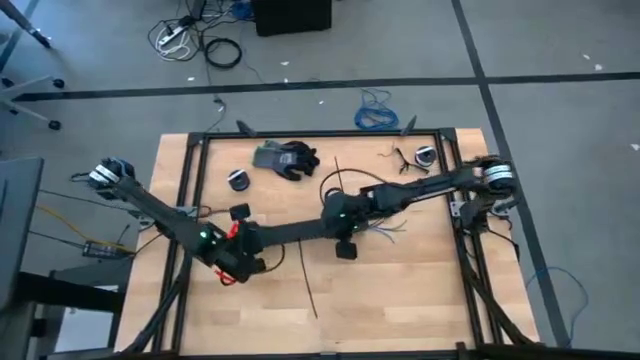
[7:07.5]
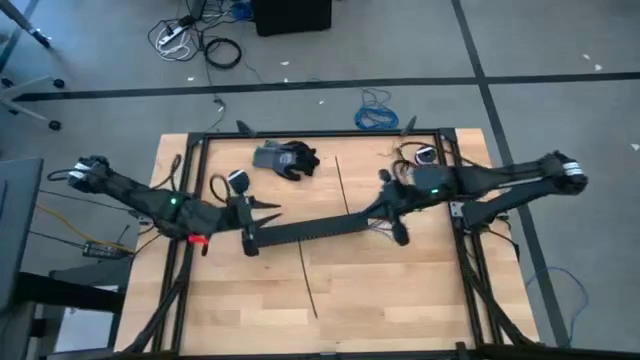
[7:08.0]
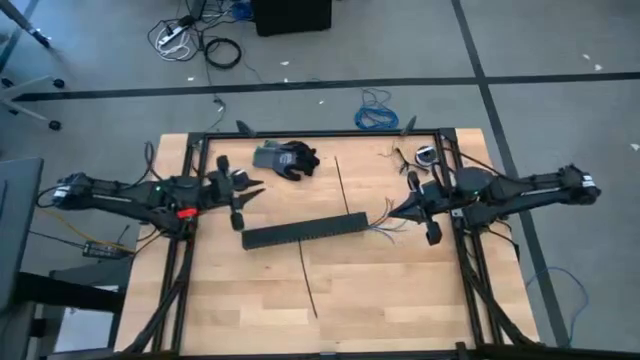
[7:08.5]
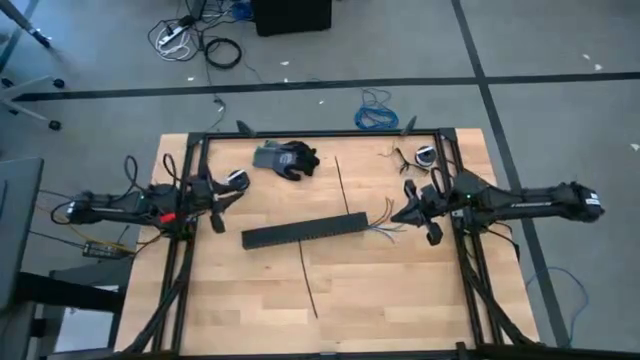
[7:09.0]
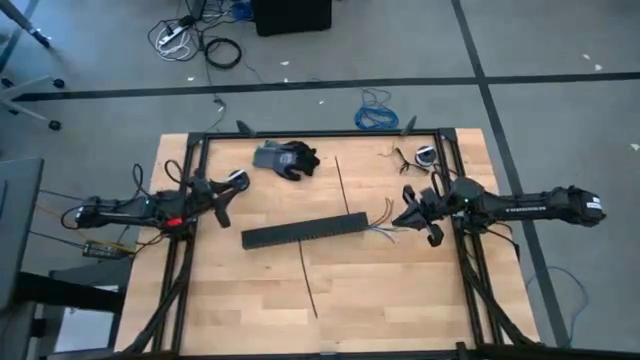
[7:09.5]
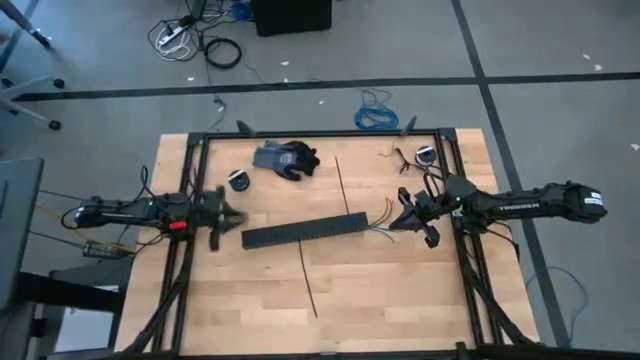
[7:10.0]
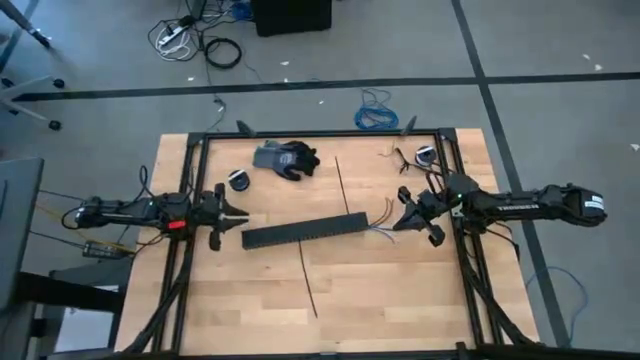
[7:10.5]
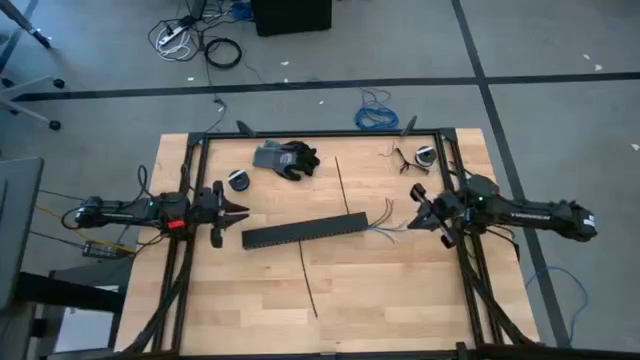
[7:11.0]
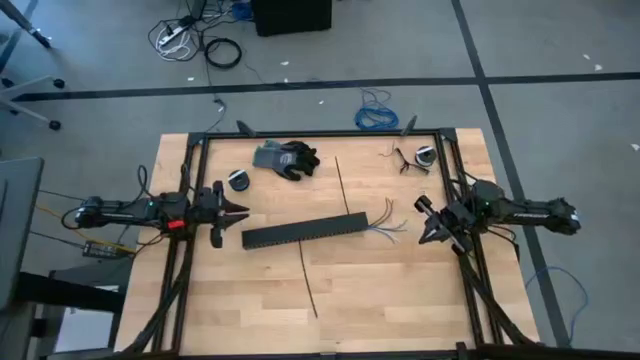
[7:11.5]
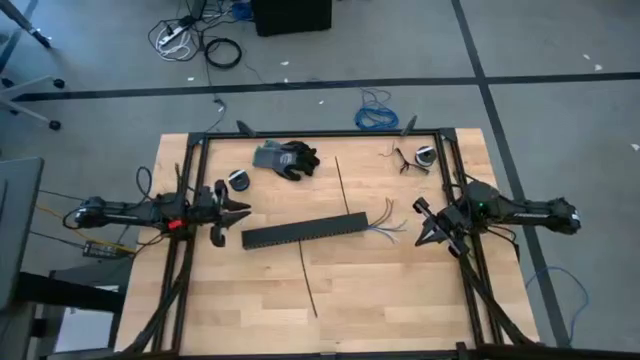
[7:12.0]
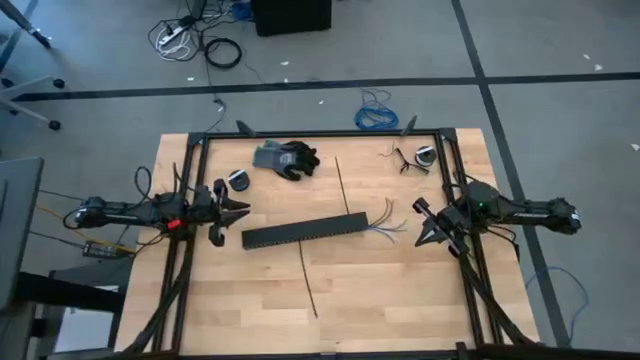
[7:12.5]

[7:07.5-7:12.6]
Task: Ziptie cables
Return to Home Position

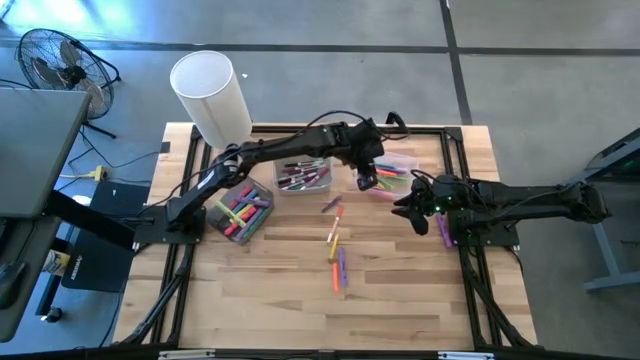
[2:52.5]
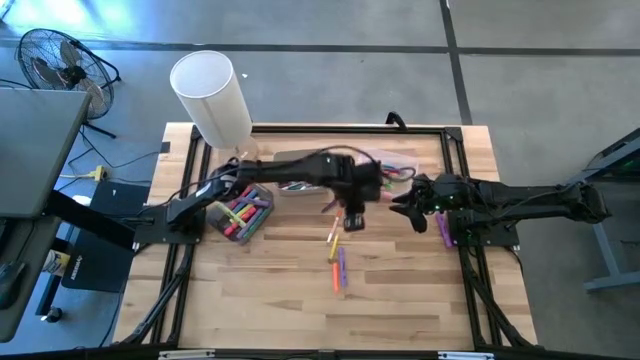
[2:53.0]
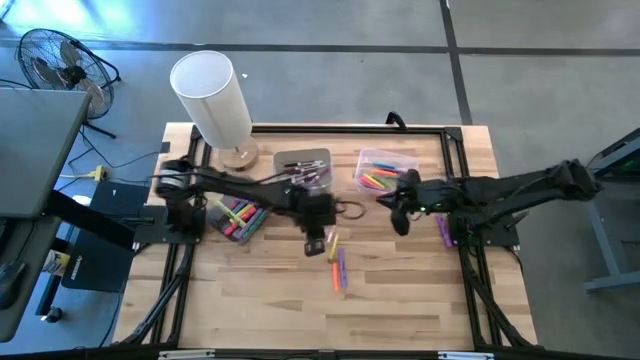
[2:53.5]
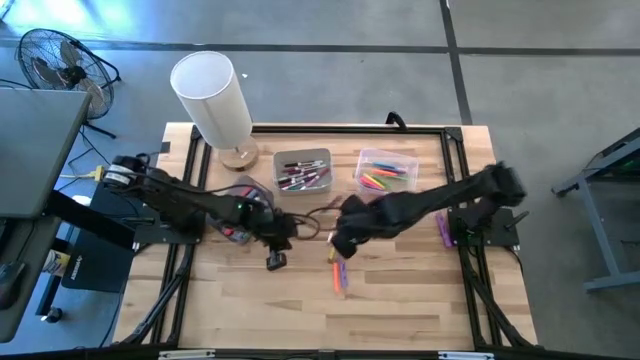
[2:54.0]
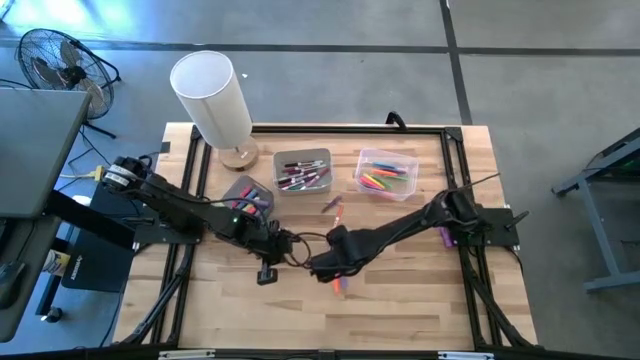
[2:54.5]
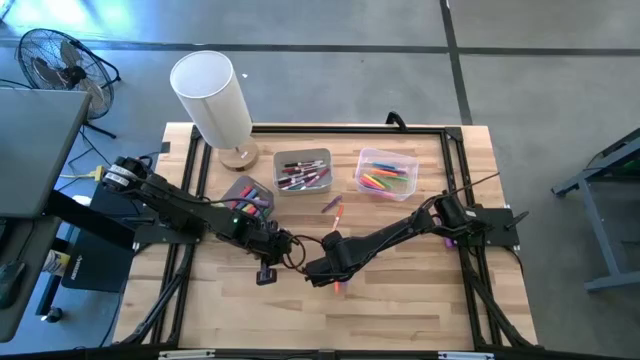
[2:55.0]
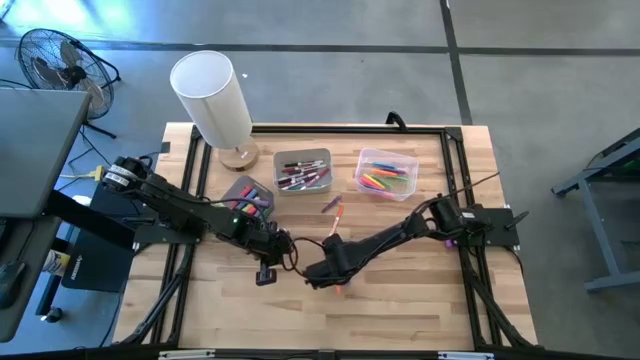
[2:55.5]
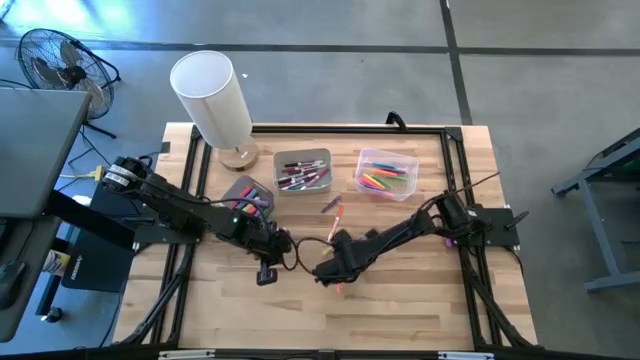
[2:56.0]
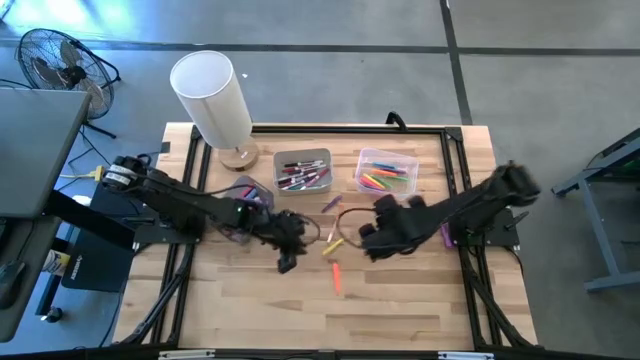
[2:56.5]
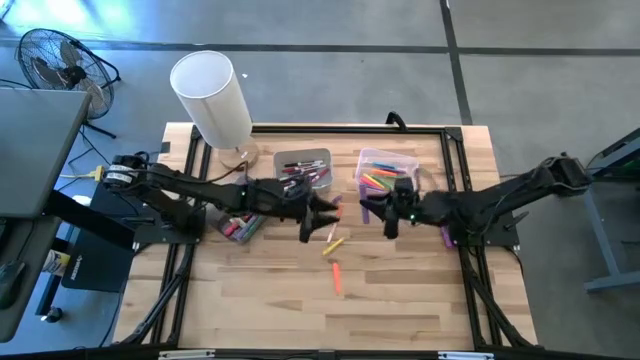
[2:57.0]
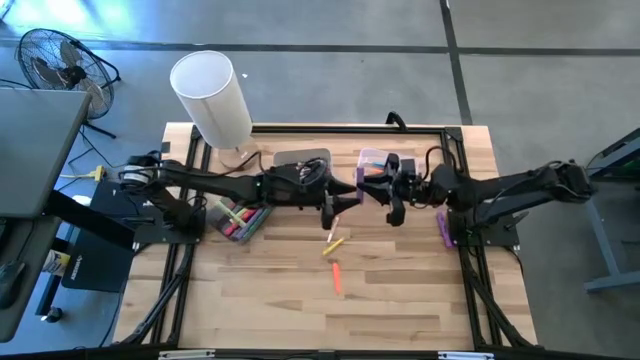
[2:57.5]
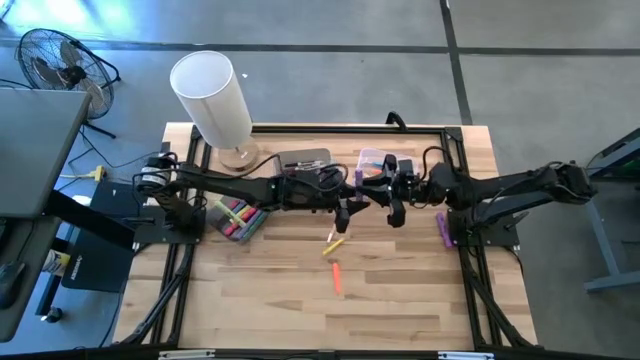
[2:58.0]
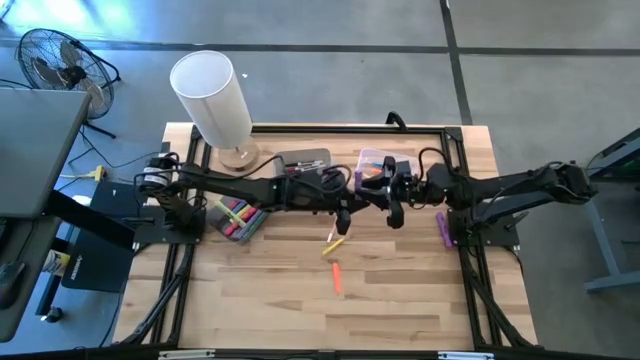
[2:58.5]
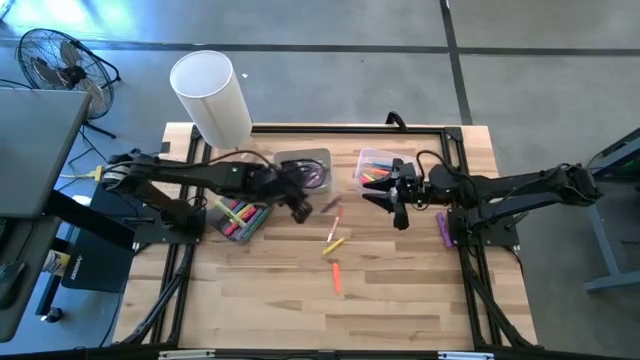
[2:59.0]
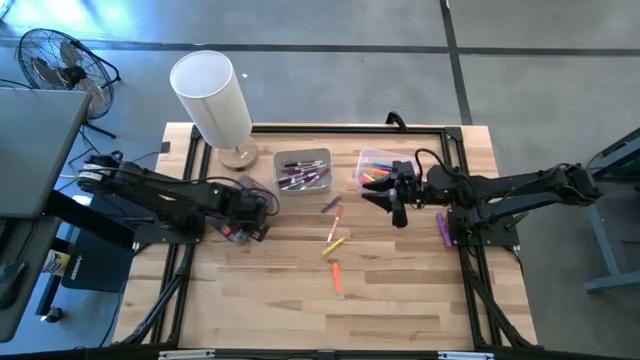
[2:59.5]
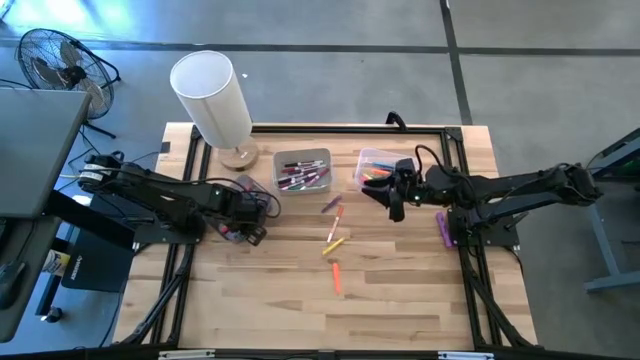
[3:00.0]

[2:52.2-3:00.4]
Task: Pick & Place Markers
Put the purple highlighter pen into the black bin

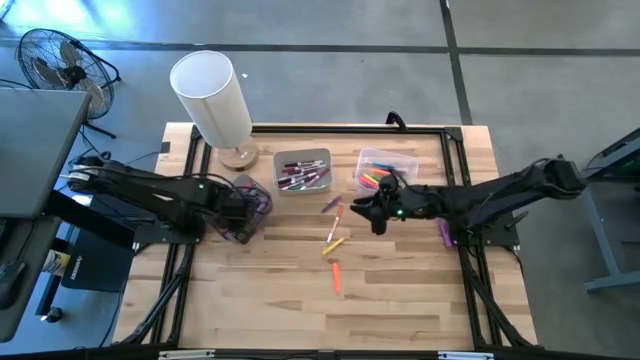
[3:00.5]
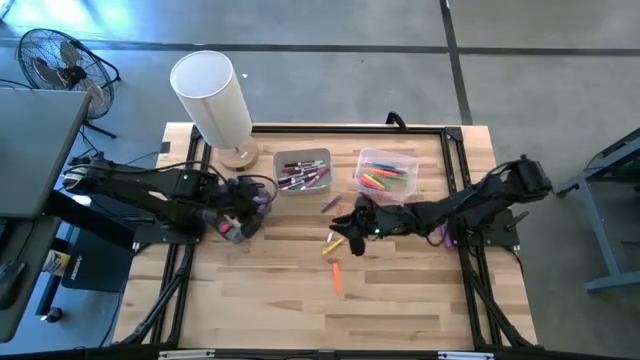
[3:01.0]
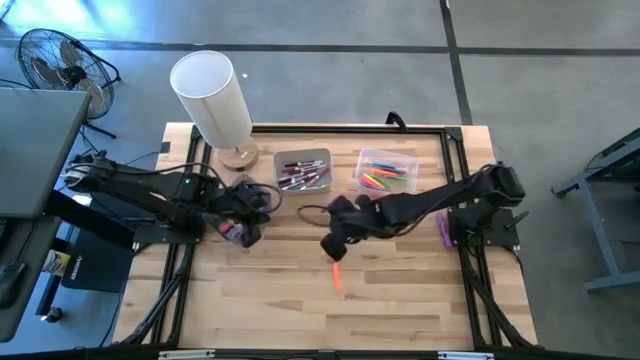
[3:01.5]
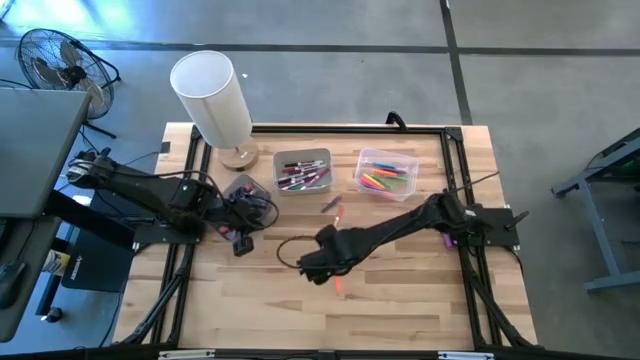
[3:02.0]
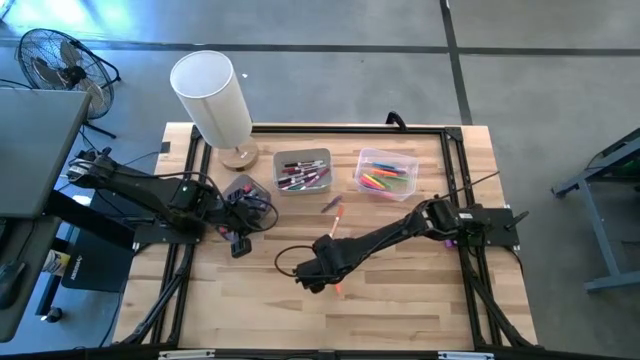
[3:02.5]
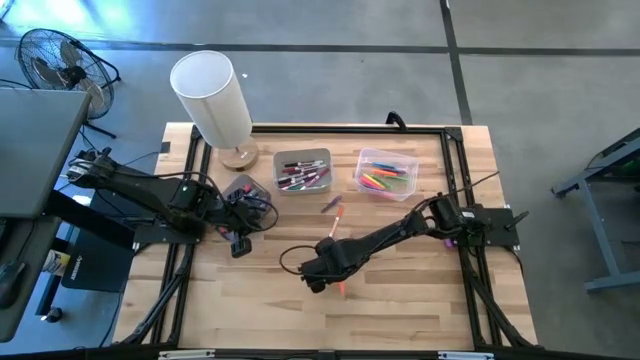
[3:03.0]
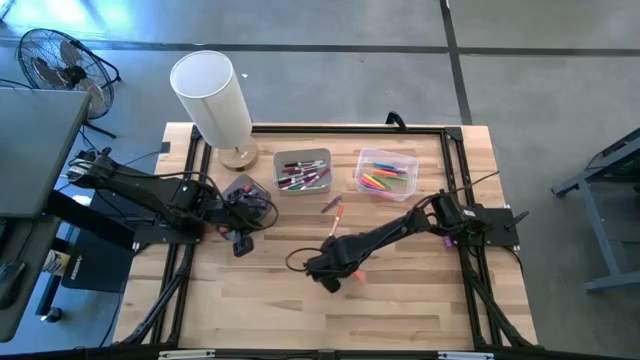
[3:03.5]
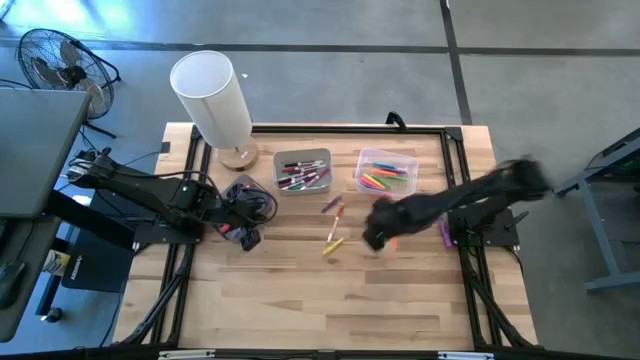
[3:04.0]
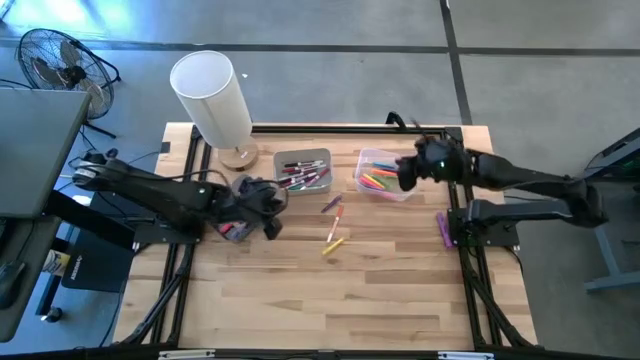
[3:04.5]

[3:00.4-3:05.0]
Put the orange pen into the transparent bin

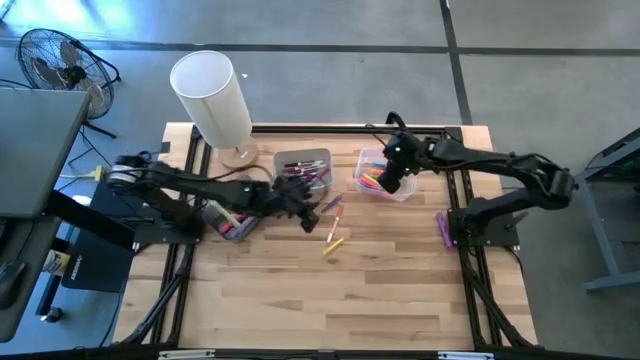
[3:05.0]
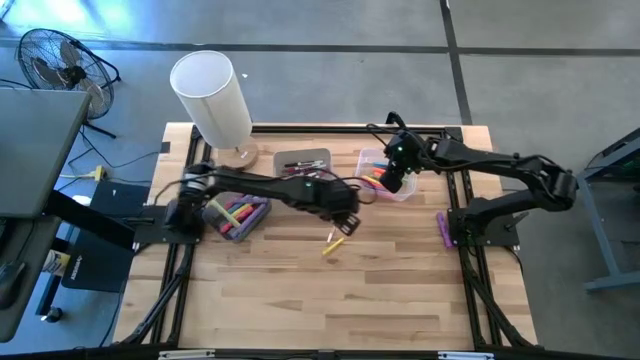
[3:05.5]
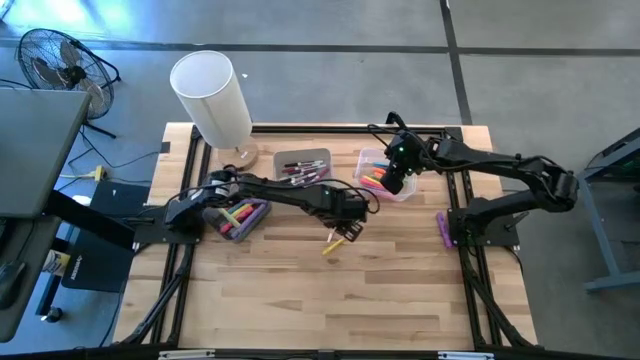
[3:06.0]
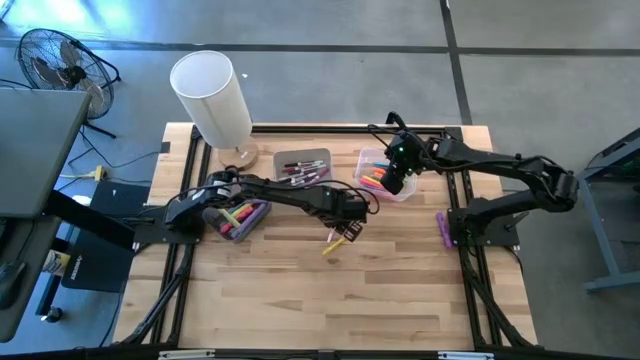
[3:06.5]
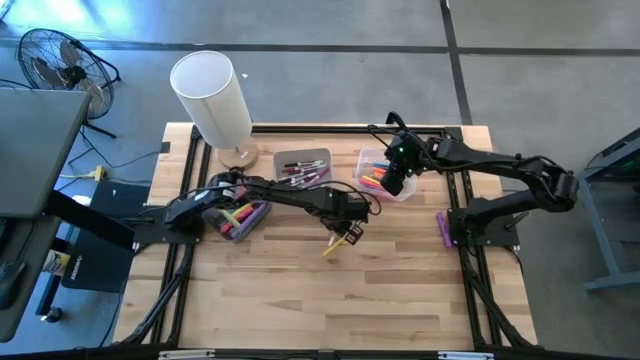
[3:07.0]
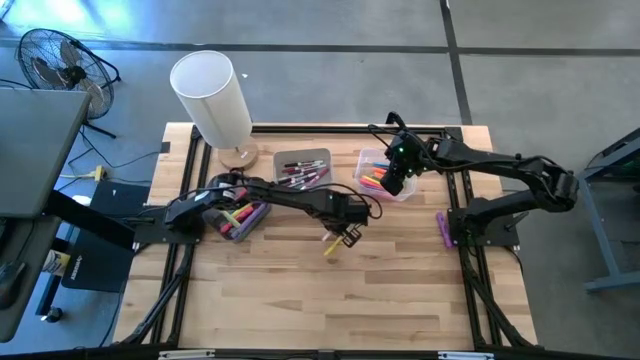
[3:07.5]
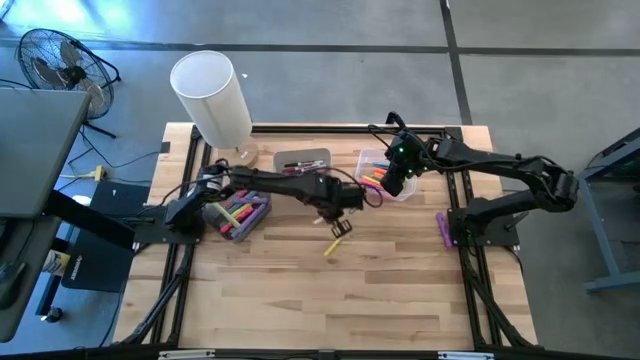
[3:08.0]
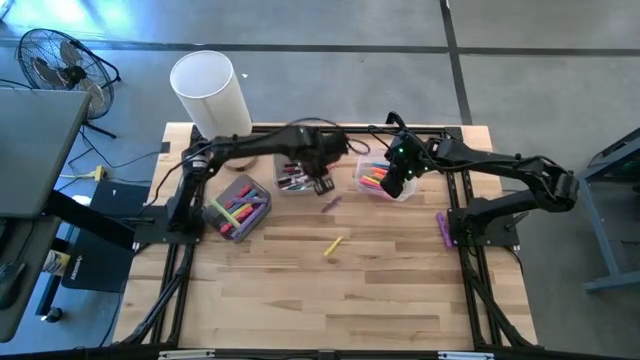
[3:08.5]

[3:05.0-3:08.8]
Put the orange marker pen into the white bin
